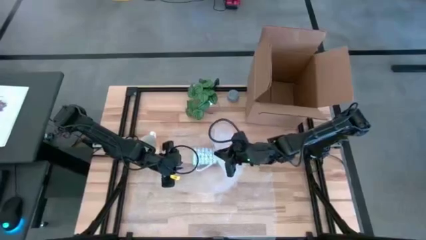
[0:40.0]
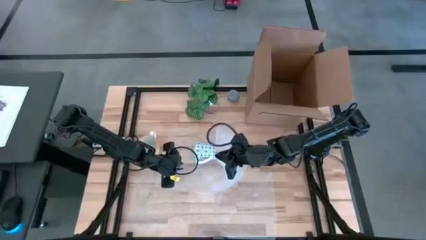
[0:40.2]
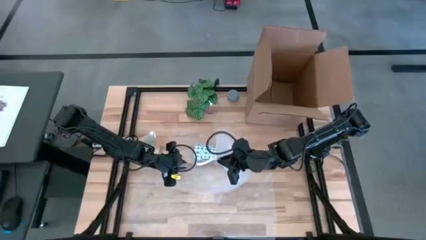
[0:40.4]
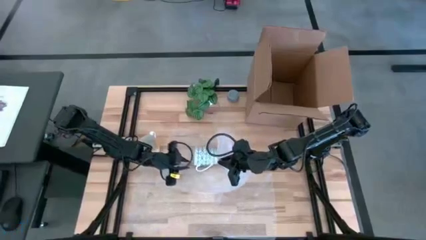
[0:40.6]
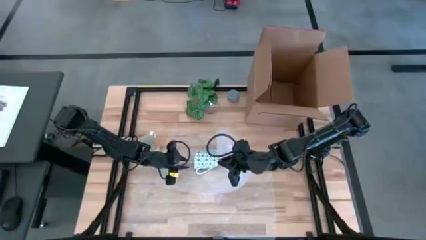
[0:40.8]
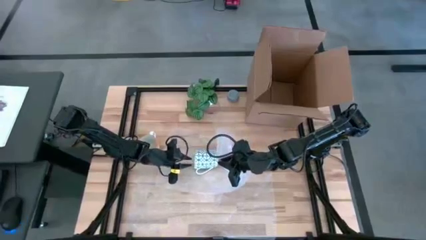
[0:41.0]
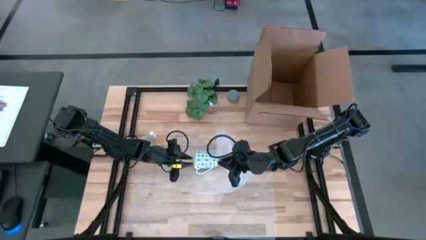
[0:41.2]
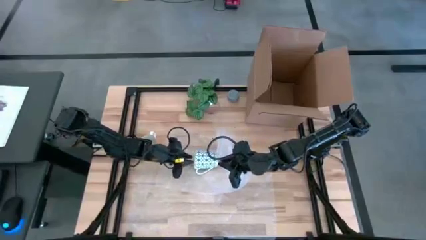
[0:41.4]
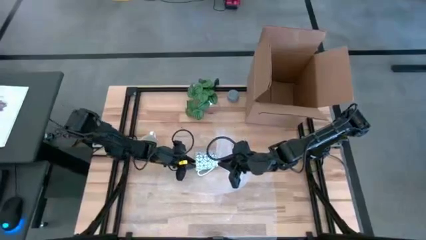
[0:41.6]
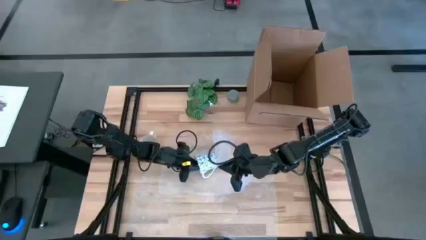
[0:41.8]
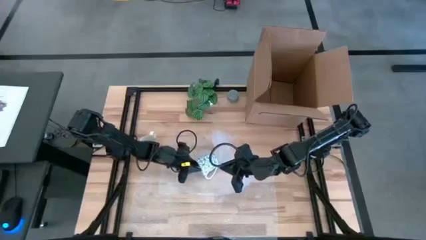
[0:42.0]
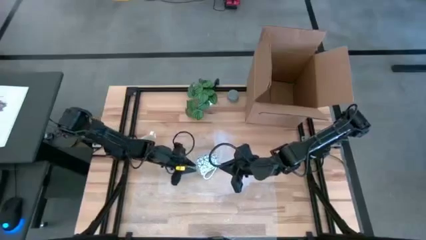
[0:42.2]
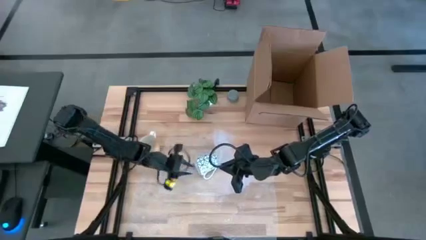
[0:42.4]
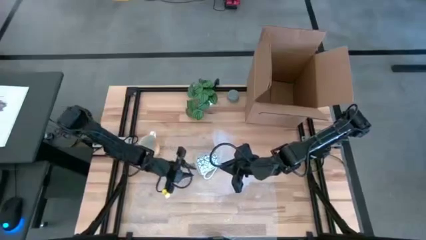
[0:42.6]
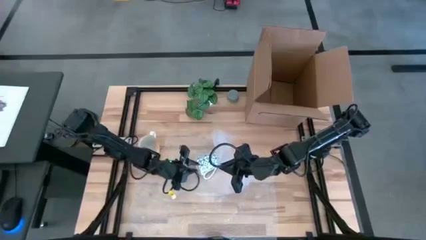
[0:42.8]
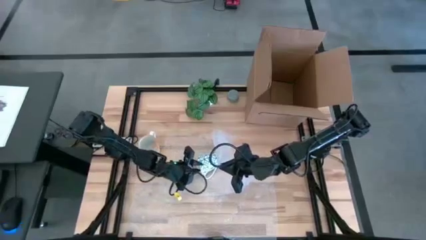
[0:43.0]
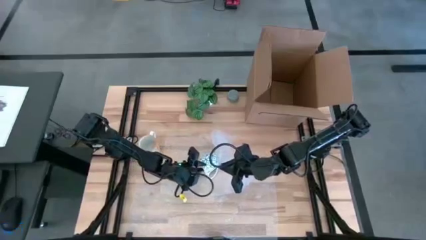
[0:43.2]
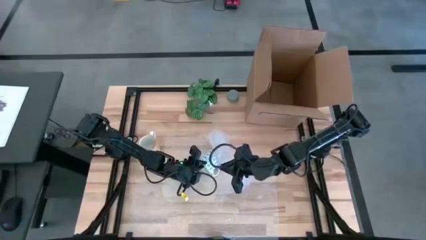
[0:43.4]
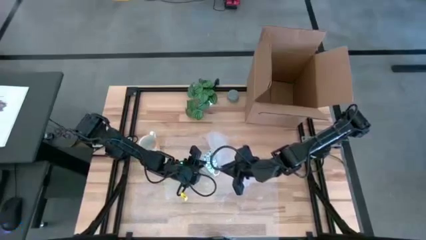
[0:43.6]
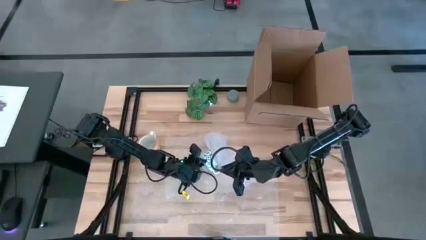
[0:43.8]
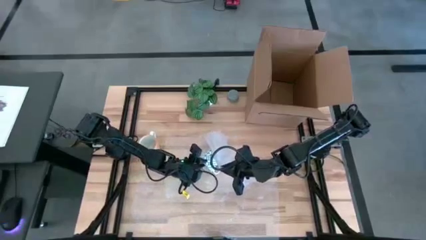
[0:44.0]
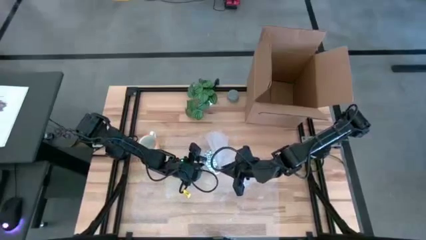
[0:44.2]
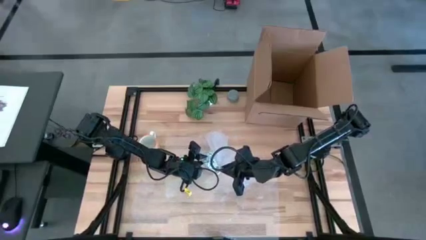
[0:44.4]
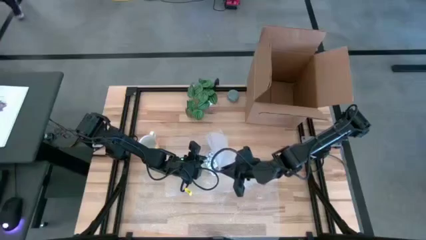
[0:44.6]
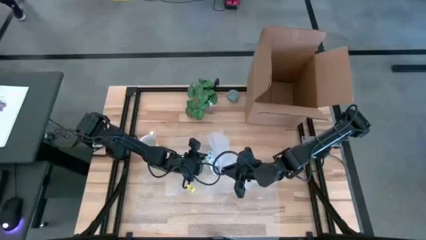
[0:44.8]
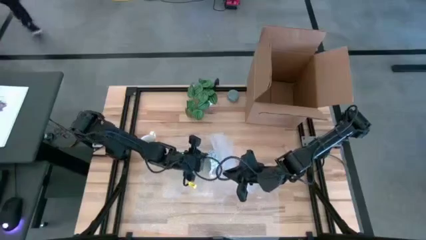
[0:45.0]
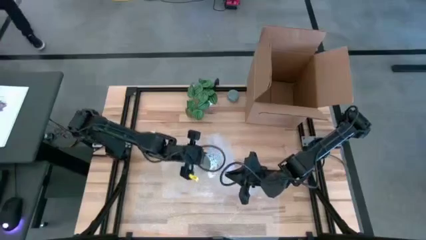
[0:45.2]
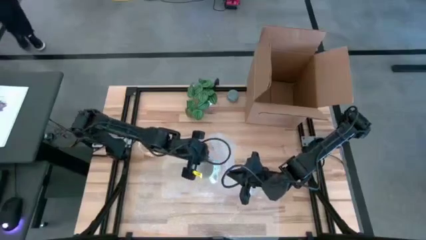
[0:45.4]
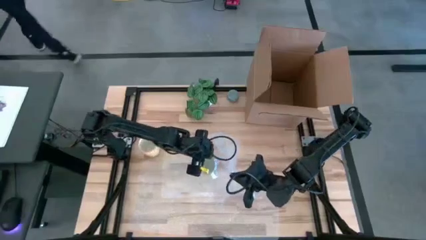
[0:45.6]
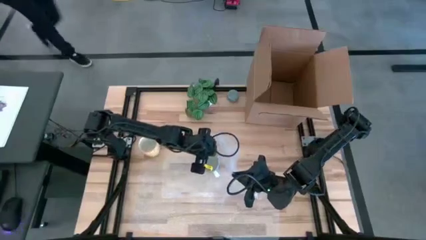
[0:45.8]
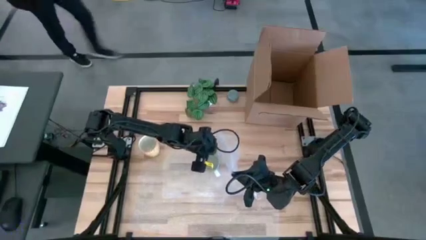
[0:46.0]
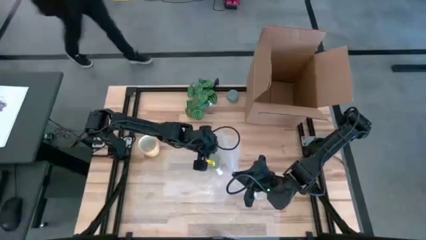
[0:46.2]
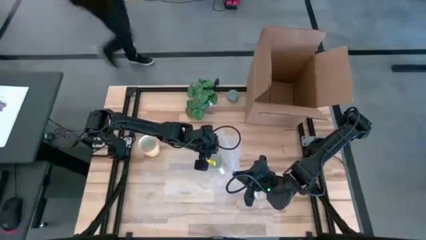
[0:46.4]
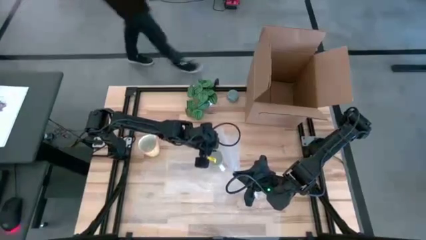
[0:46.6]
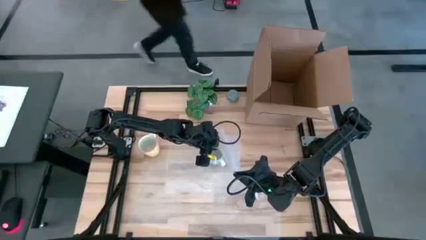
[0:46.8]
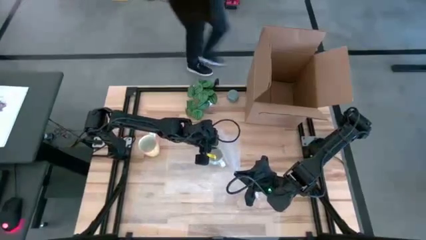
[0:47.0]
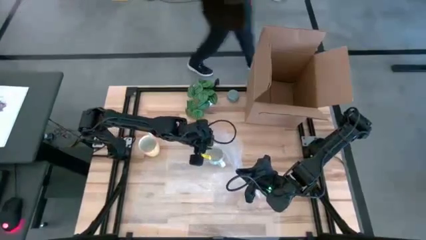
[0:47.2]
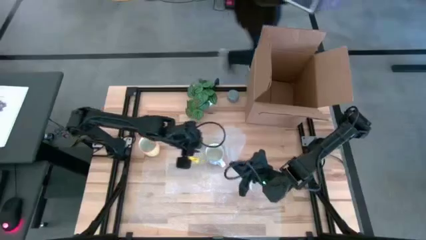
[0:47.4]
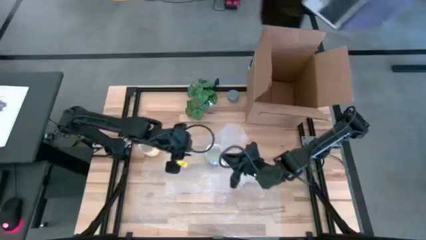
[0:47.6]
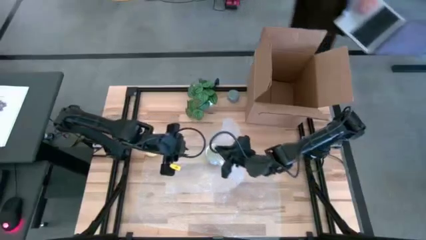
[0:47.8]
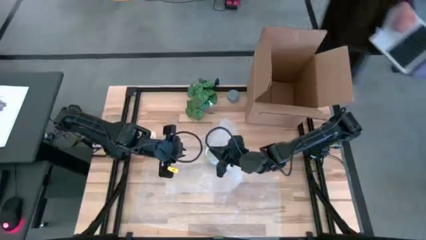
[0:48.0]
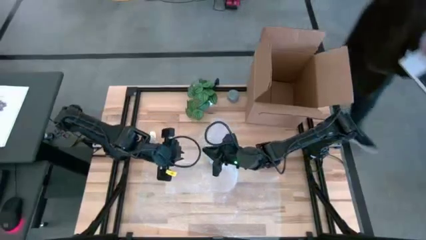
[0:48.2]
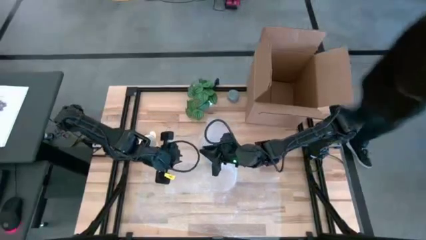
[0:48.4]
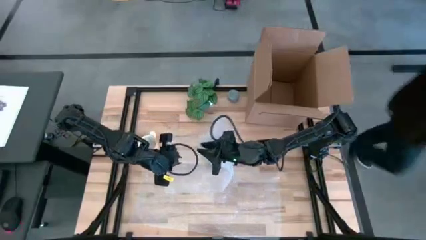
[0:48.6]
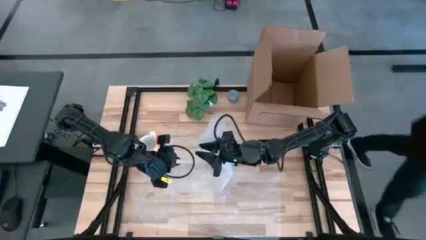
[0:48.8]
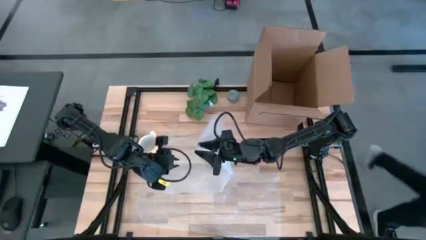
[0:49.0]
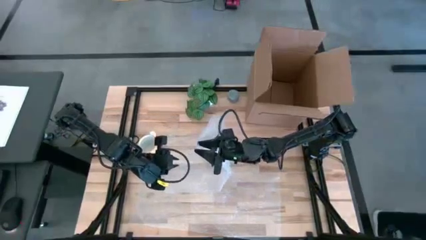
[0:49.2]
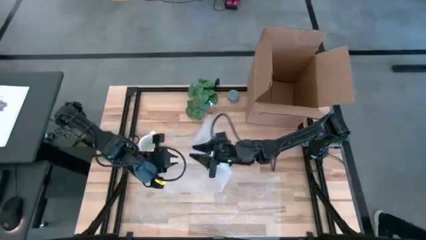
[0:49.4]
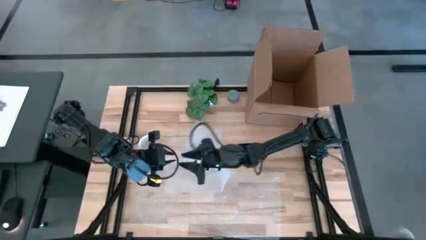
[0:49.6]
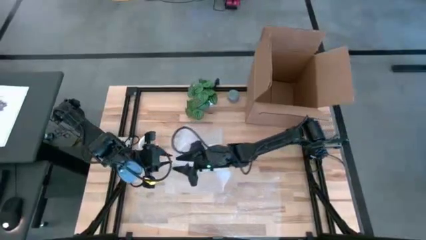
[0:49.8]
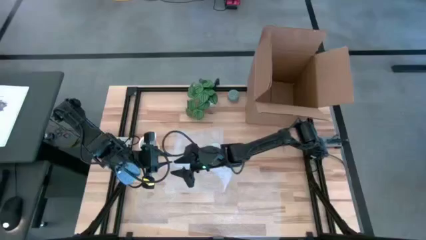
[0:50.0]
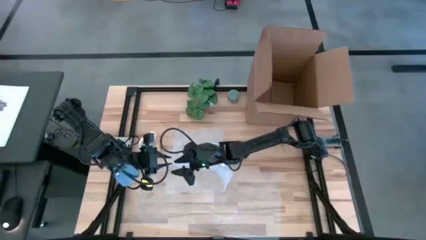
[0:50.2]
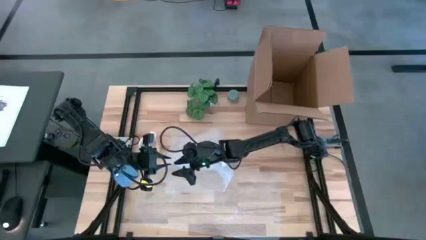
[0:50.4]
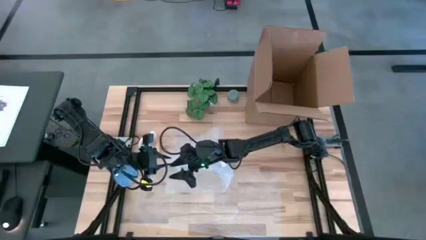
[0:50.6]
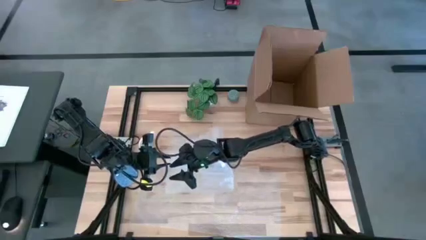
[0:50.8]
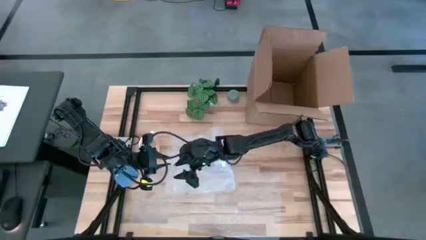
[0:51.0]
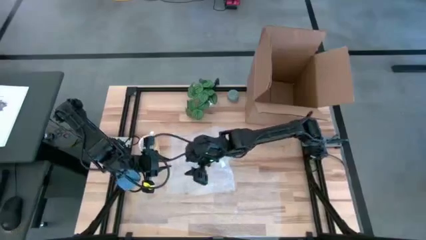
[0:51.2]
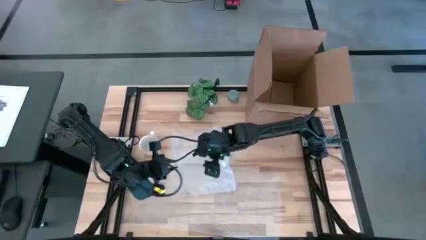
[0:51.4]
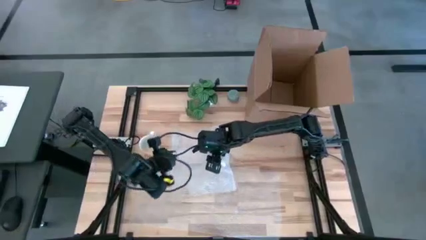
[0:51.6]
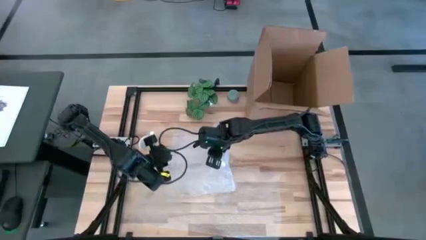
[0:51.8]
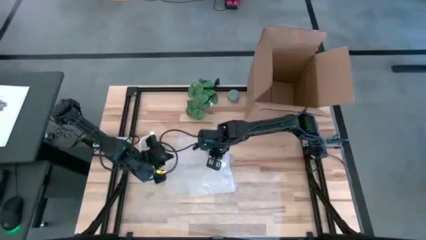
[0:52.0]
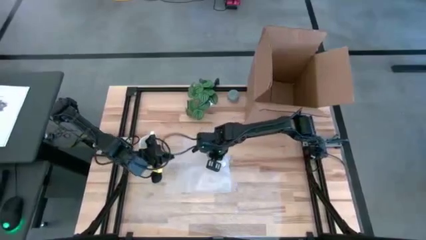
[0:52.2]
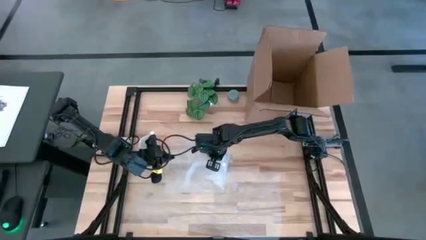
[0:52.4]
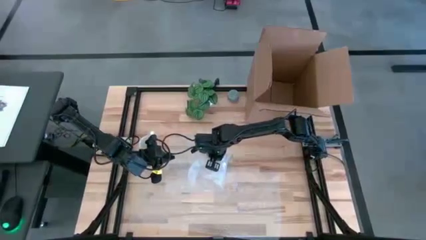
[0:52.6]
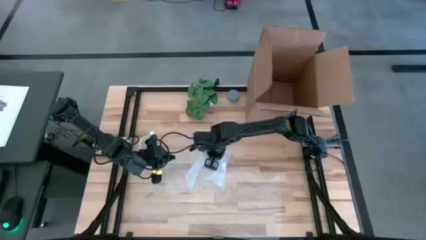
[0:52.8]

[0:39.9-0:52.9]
Task: wrap mug
Wrap the blue cup with the bubble wrap

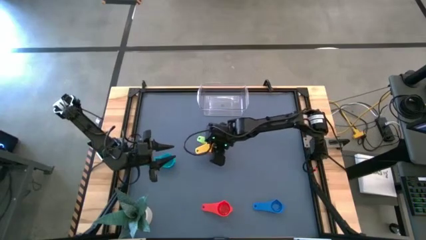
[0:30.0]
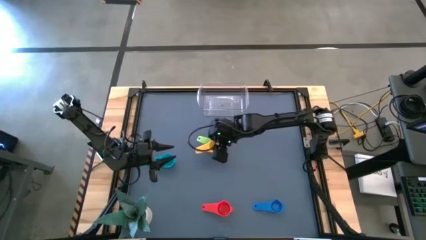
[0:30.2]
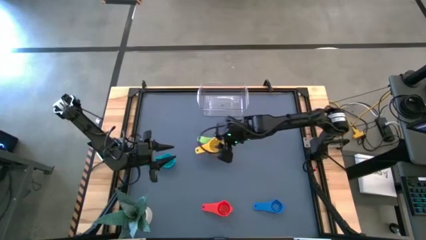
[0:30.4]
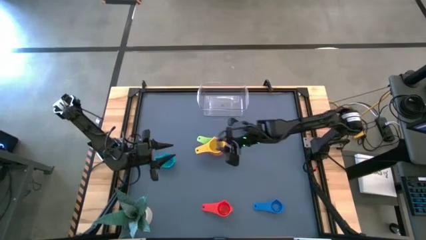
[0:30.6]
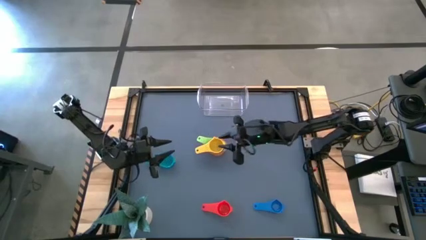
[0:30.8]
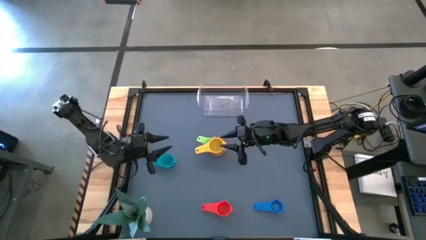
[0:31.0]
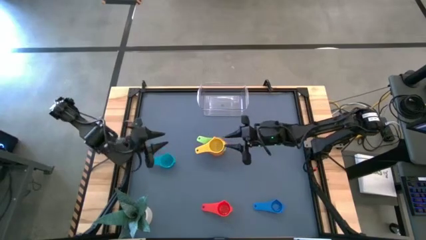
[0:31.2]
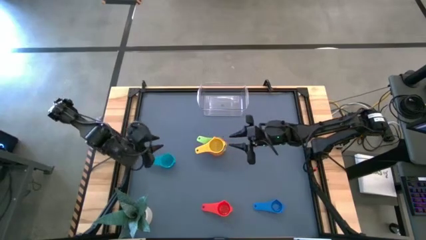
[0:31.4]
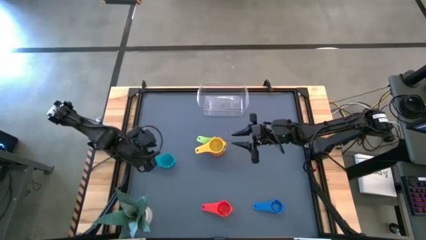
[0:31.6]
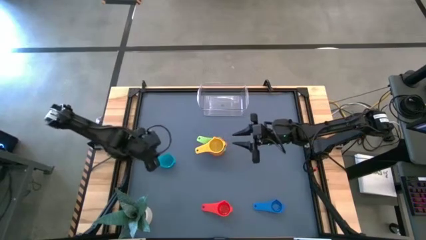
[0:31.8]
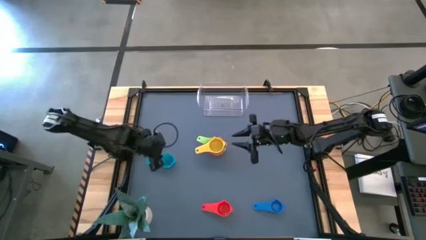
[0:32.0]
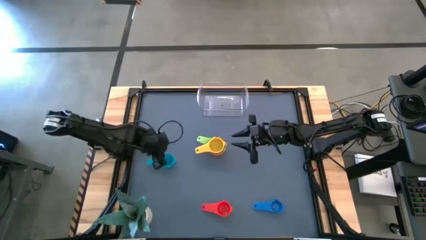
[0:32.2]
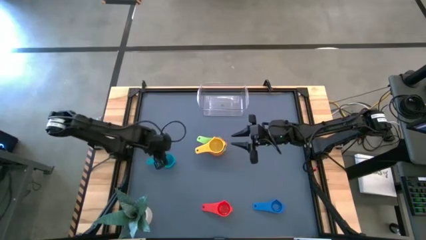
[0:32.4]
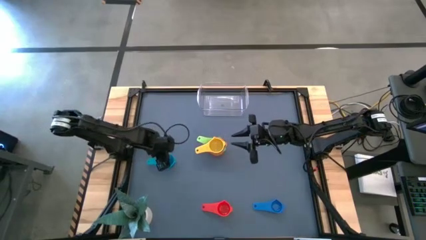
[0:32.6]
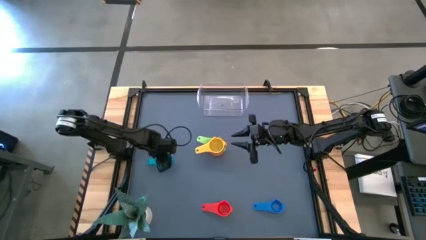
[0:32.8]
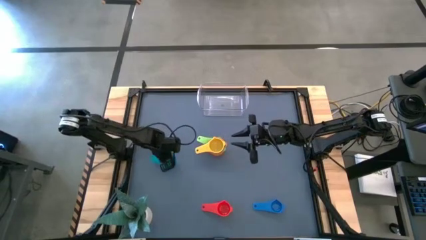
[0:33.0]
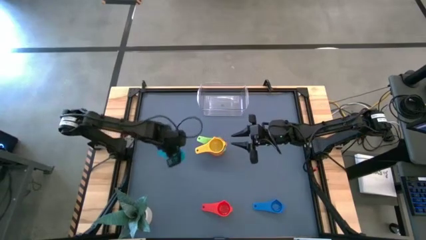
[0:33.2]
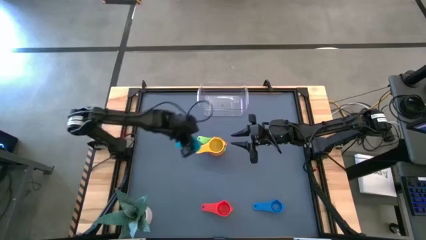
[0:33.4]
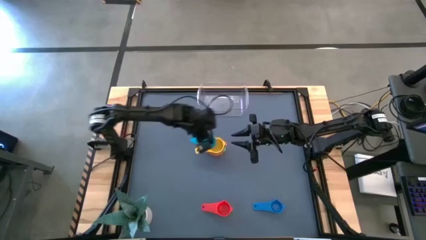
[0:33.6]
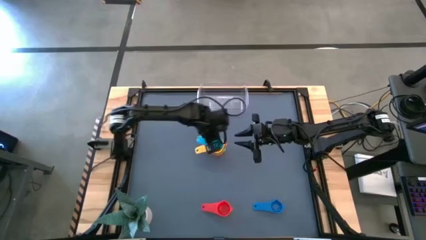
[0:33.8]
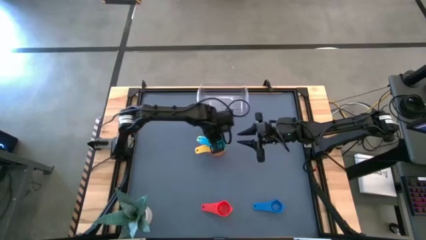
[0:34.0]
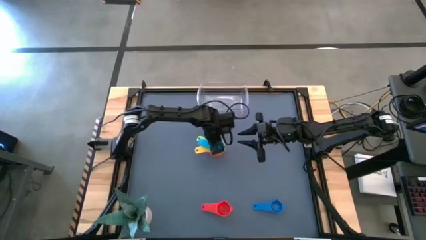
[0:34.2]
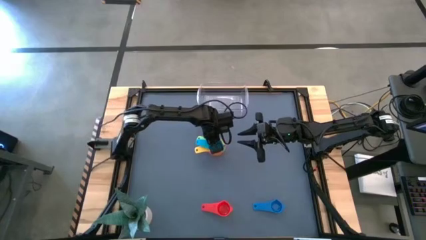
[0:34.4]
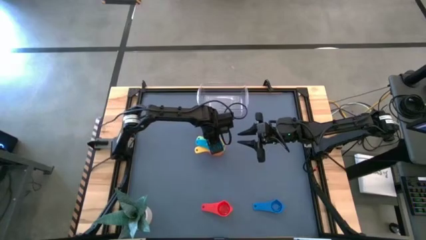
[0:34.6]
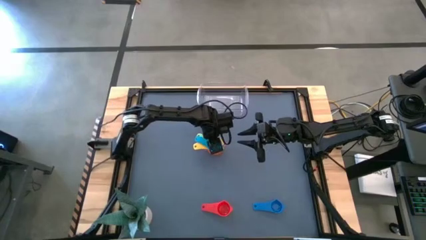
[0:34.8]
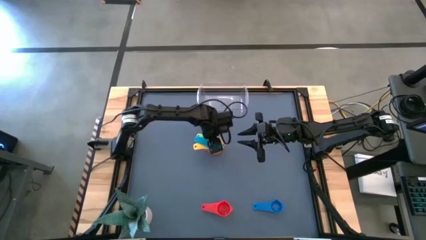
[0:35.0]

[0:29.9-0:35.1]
Task: Nest measuring cups in basket
Stack the light blue measuring cup on top of the yellow measuring cup
